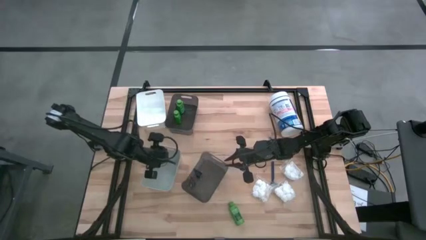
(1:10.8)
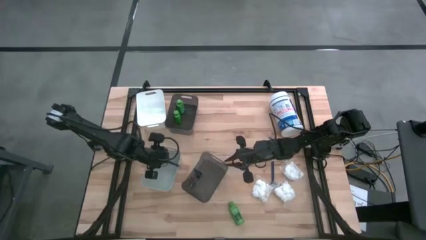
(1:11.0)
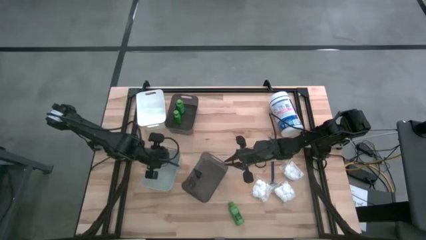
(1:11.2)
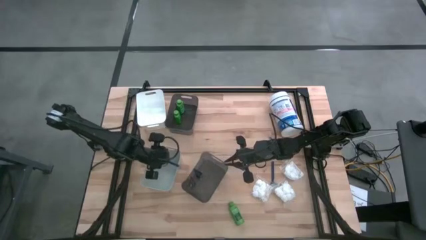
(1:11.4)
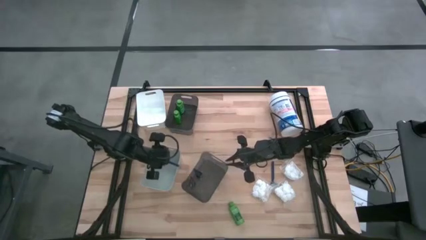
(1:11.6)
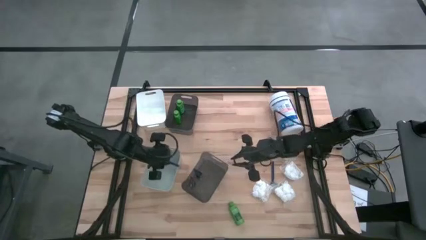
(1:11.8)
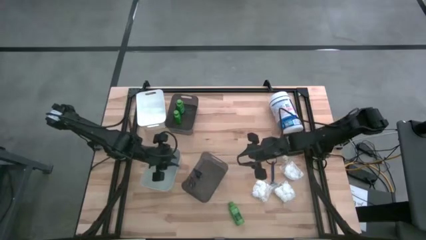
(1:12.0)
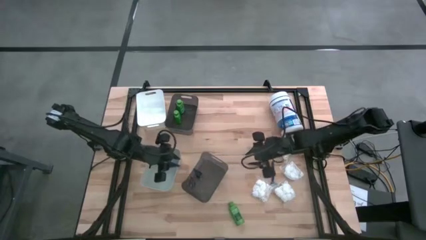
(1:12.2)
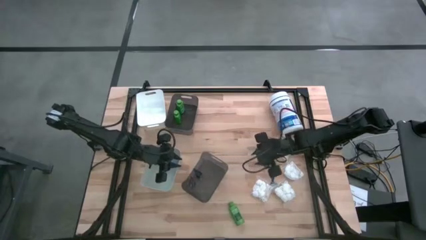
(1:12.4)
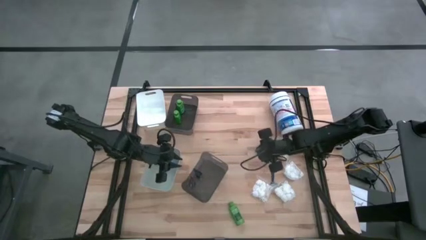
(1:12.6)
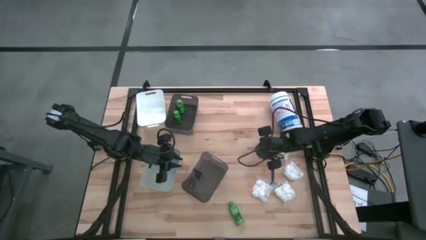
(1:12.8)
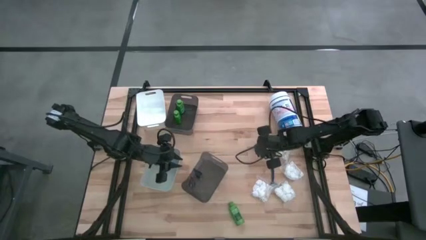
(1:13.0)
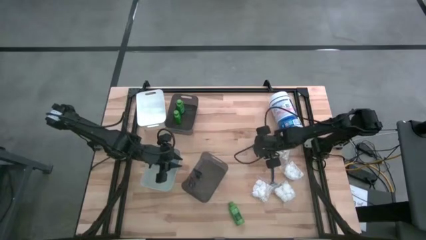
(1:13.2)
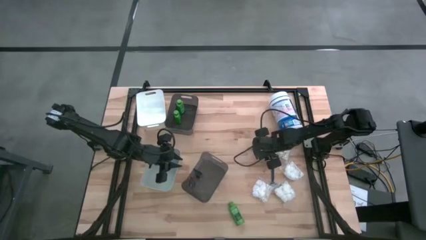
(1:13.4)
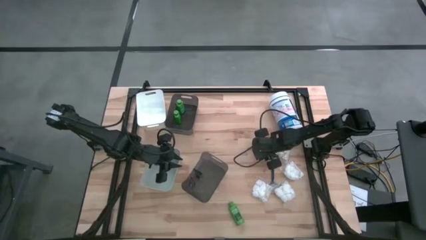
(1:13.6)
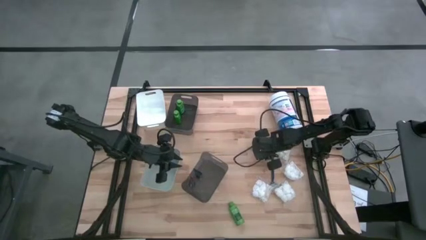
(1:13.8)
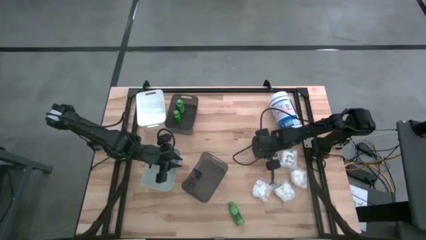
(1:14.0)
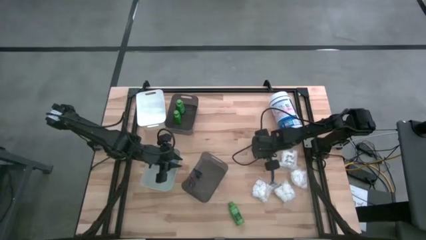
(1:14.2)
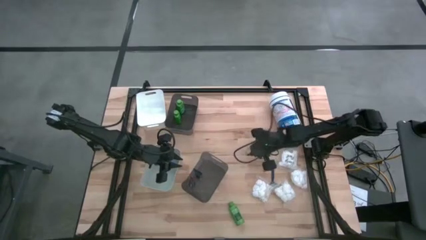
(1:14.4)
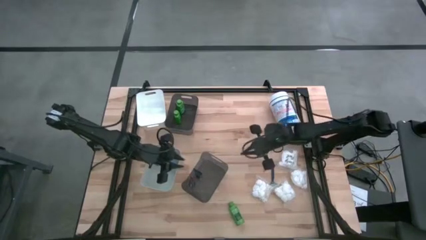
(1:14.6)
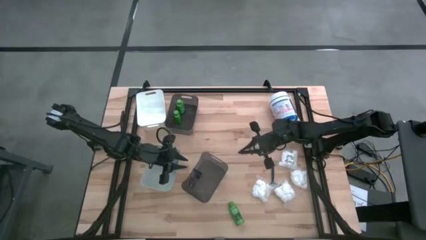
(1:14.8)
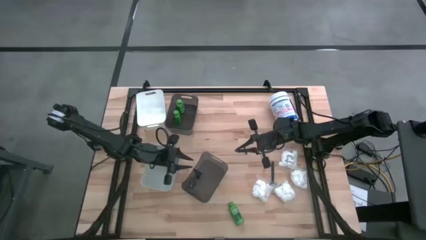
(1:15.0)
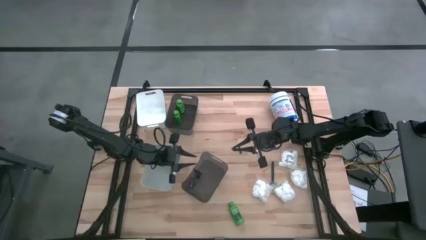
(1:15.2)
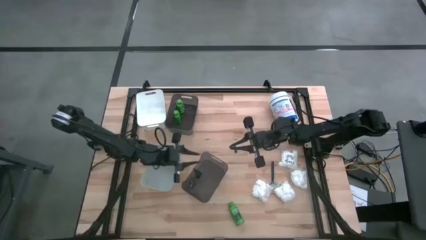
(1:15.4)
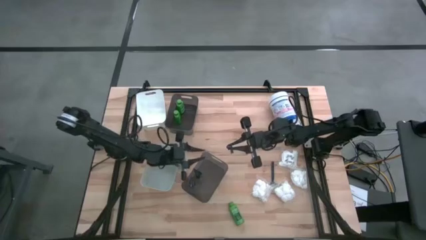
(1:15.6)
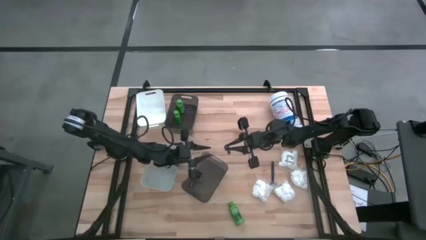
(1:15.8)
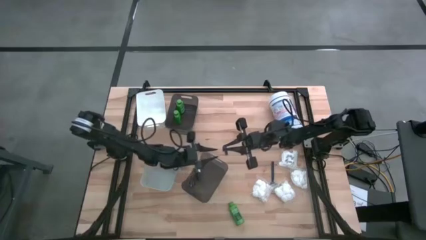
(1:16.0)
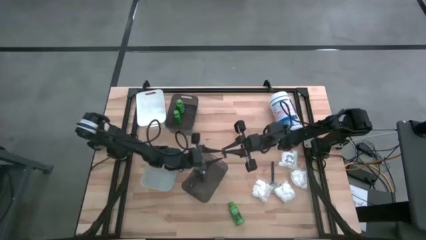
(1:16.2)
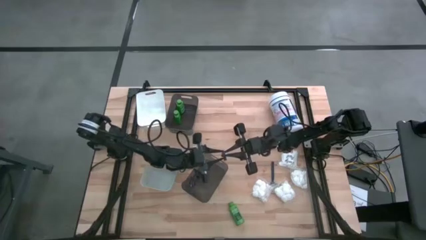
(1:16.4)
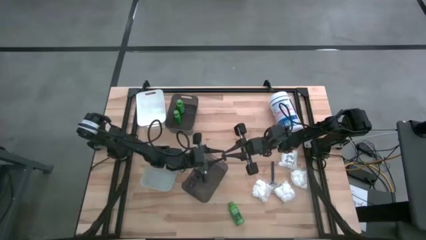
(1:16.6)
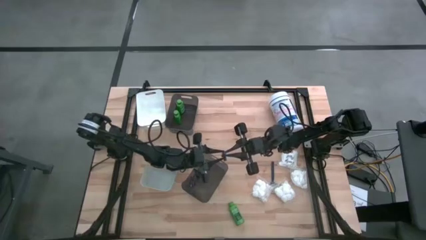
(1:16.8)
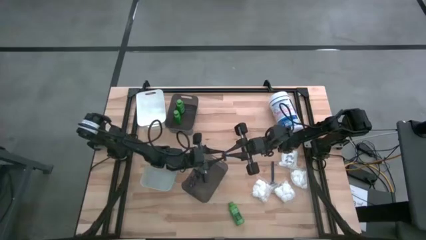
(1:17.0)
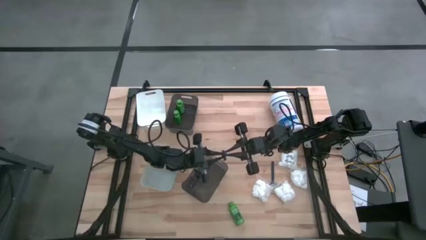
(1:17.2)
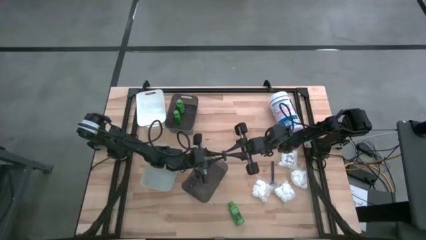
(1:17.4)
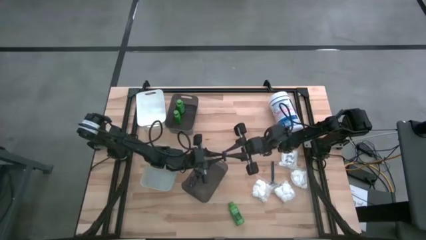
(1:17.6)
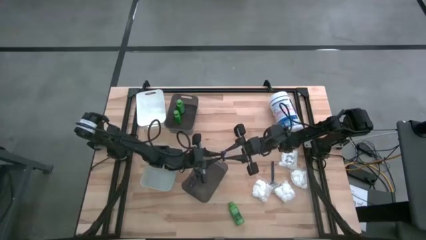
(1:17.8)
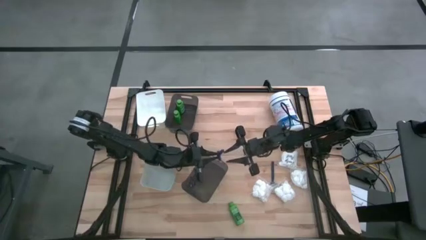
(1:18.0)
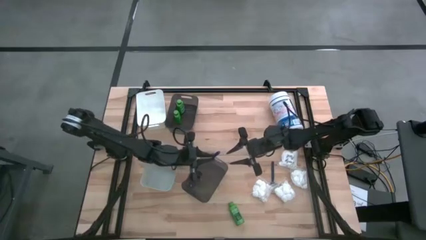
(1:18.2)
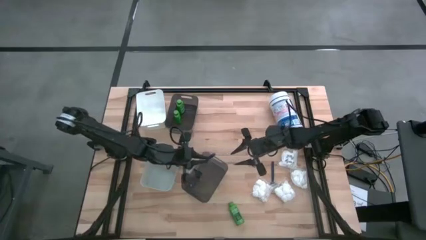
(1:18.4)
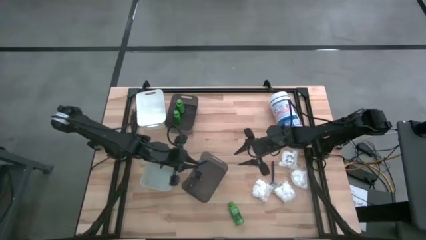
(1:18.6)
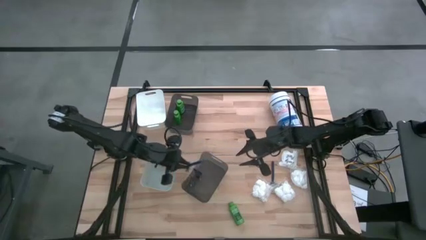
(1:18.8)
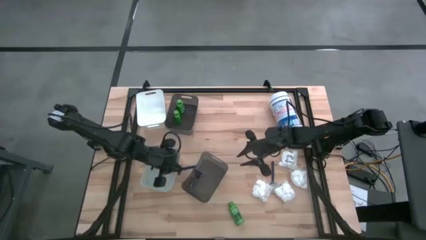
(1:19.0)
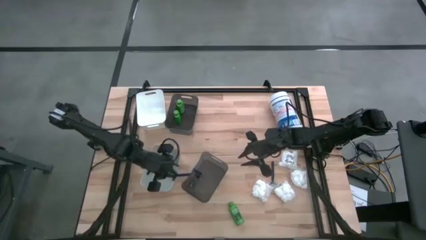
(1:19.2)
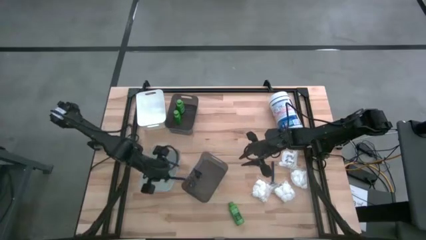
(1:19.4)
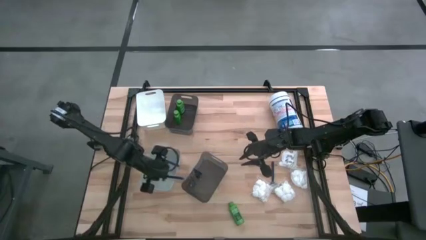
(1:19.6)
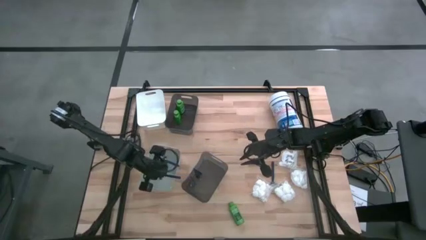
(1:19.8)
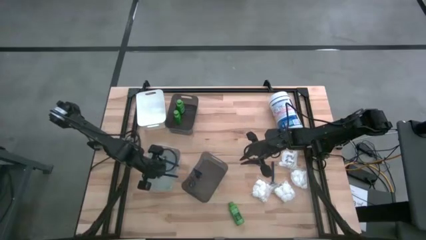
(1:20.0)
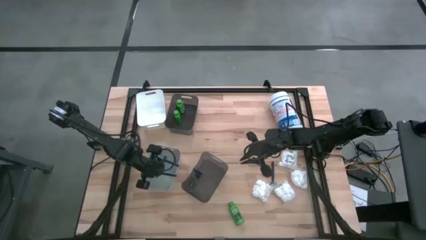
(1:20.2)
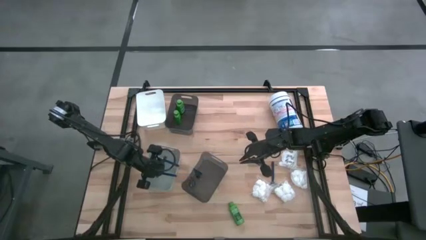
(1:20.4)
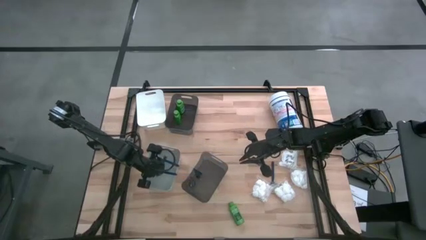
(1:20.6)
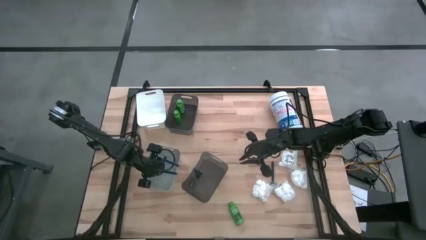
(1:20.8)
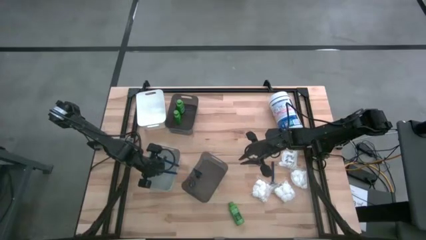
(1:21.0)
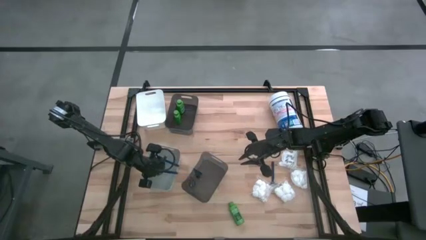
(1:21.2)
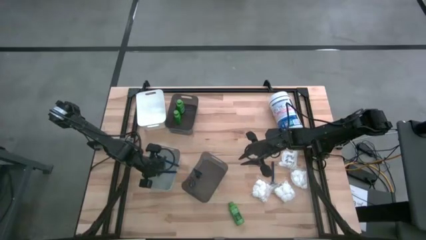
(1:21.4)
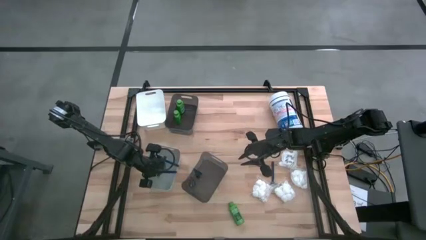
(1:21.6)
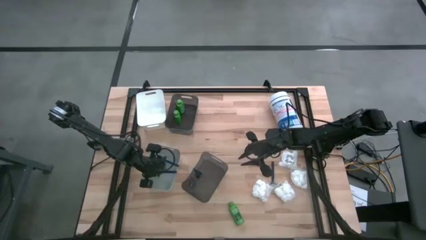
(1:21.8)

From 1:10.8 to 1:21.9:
Task: Pick & Place Travel size toiletries
Put the top blue razor into the gray bin

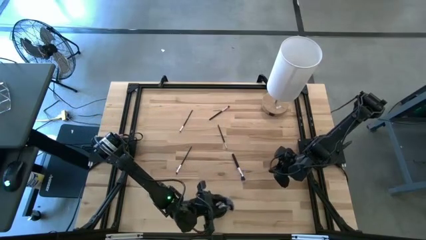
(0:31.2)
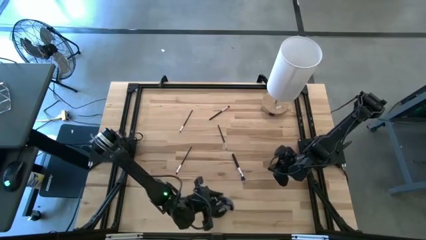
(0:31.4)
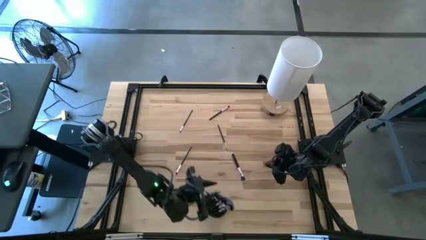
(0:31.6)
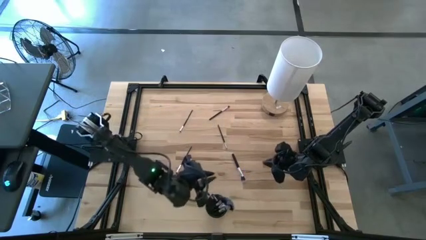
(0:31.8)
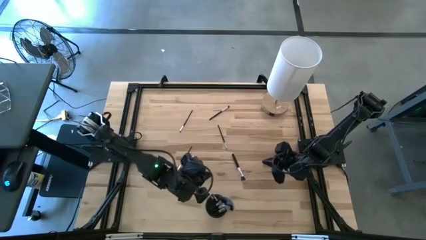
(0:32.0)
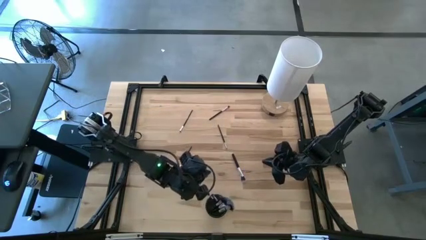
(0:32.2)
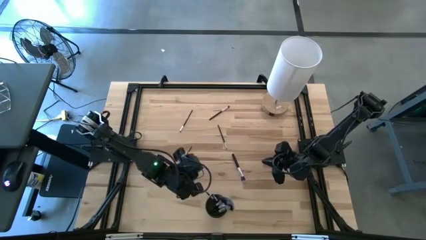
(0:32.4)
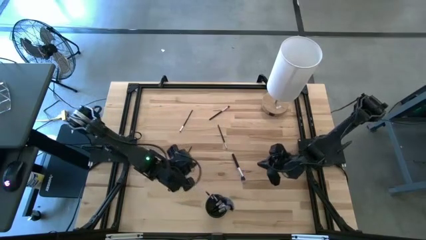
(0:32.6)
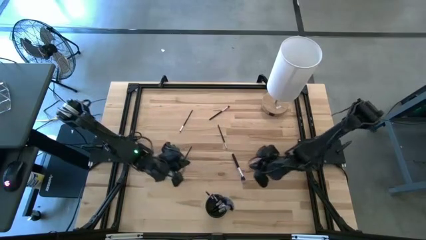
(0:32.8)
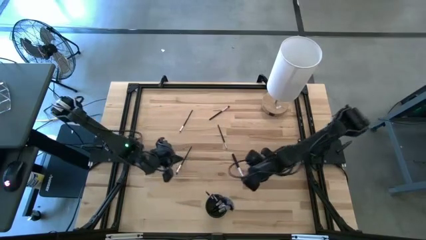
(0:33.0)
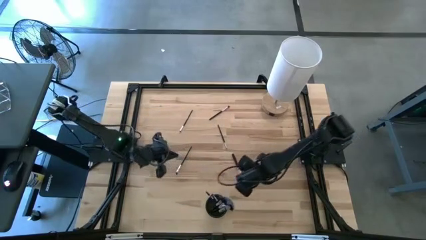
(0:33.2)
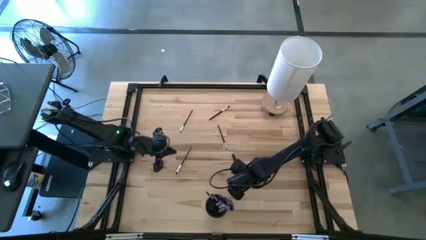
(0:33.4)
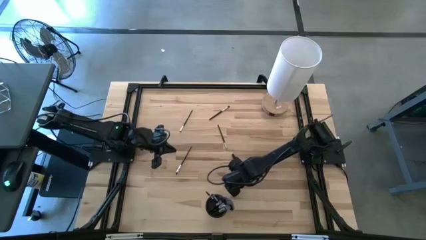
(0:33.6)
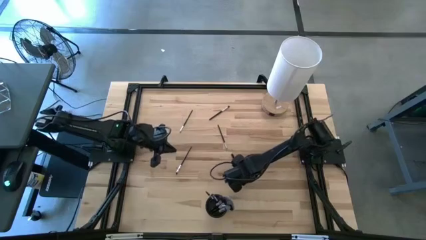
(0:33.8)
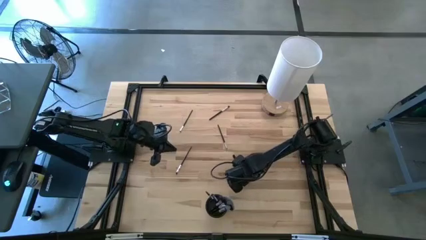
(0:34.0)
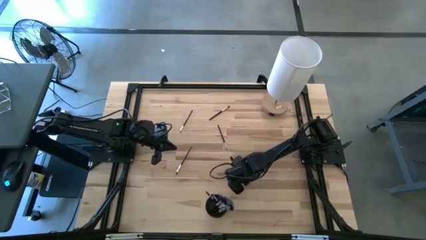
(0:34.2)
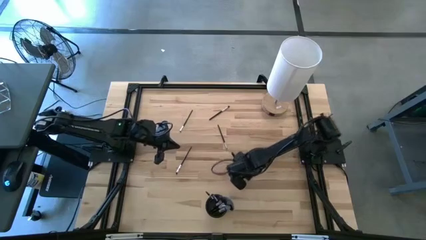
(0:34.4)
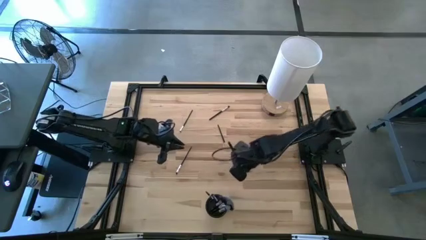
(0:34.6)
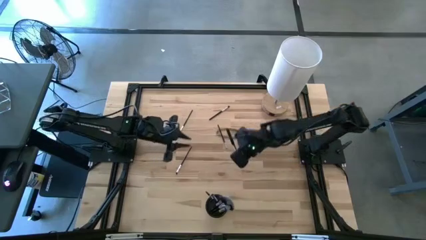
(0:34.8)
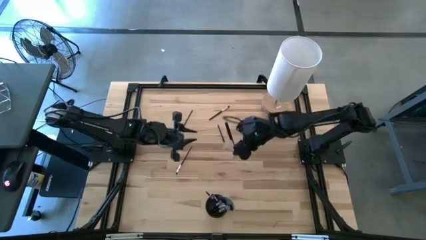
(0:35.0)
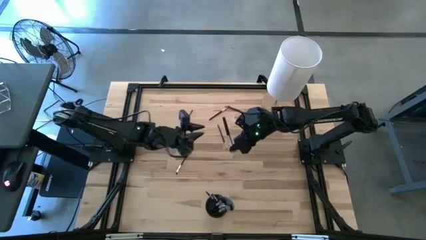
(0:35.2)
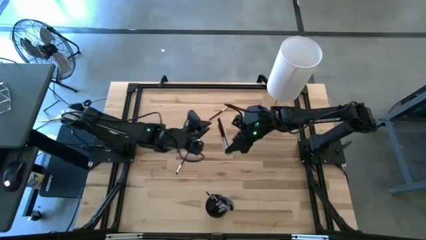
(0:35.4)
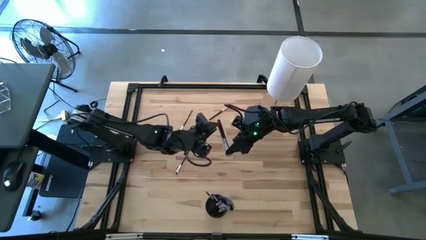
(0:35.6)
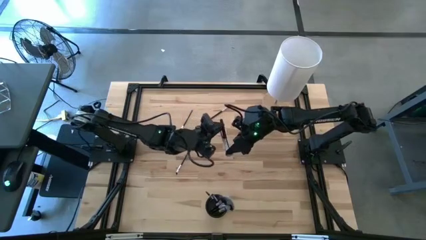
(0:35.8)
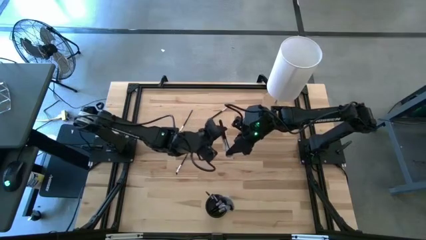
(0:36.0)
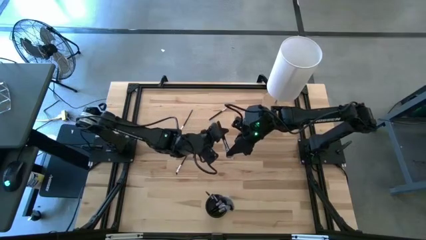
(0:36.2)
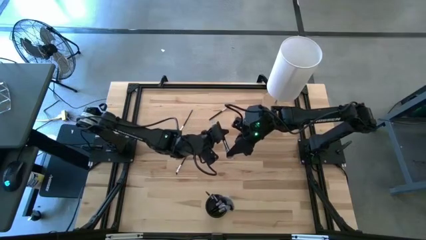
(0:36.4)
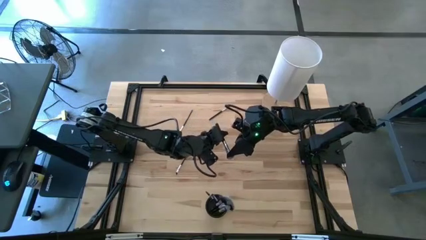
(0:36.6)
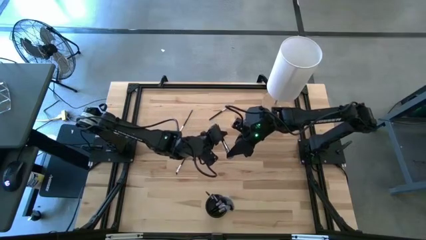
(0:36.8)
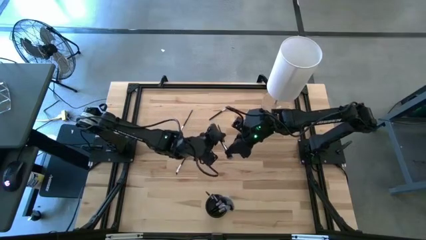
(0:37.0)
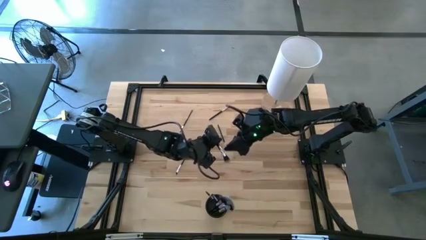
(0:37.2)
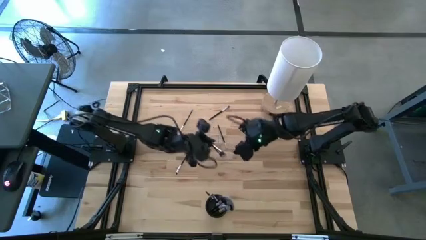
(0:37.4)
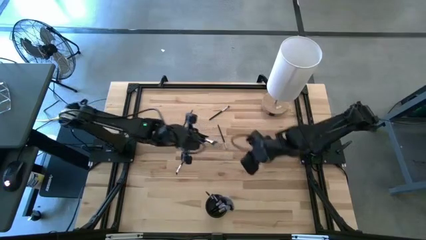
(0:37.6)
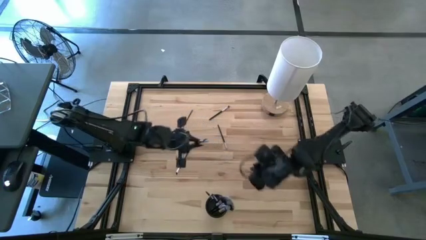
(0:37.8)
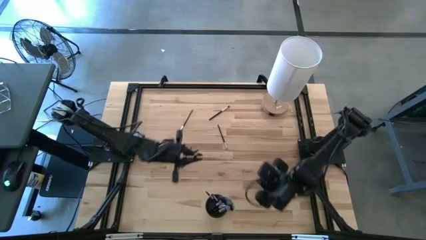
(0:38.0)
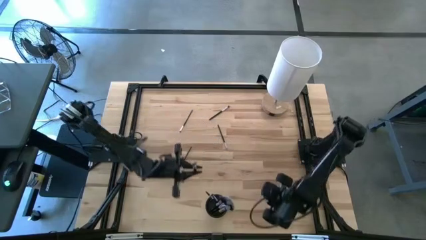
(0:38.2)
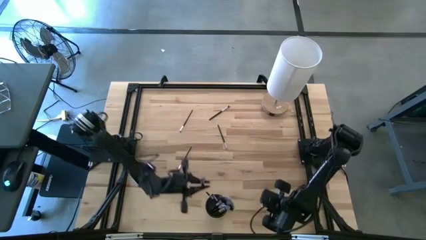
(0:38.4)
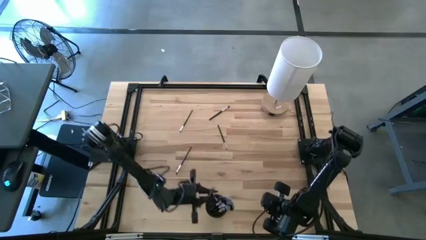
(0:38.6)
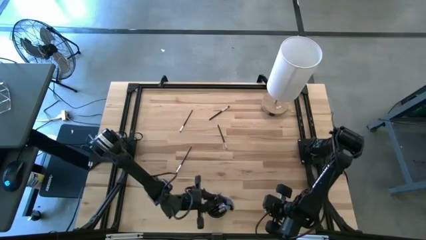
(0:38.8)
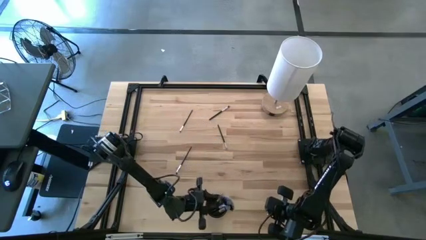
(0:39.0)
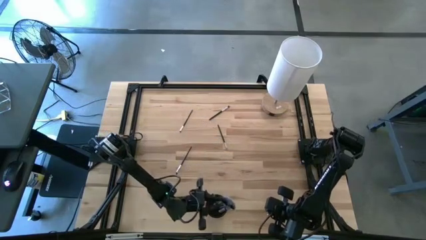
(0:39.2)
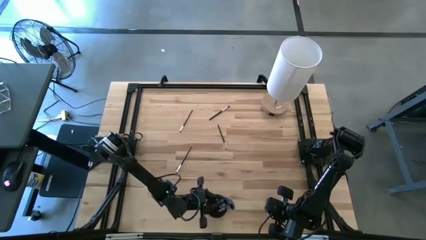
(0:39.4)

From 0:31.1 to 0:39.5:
Task: Put items in baskets/containers
Put the black powder brush into the black pen holder
